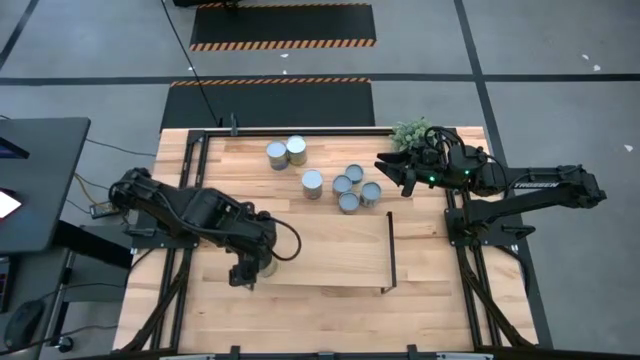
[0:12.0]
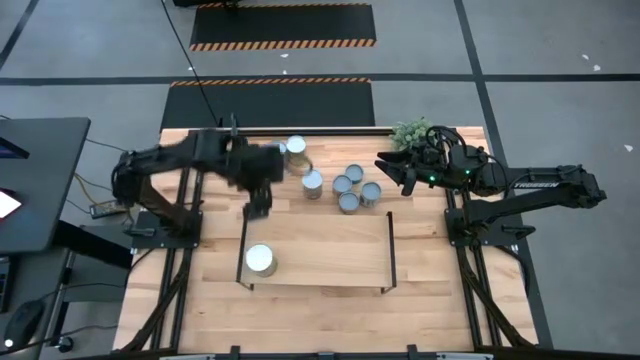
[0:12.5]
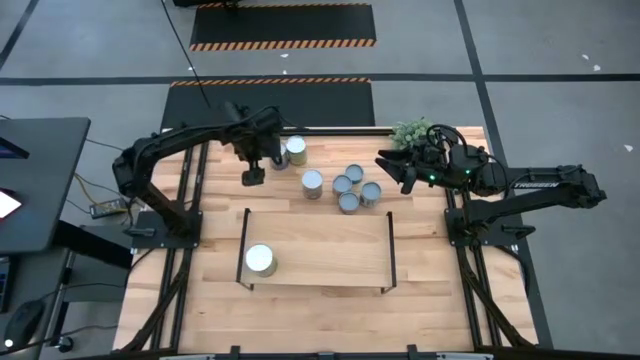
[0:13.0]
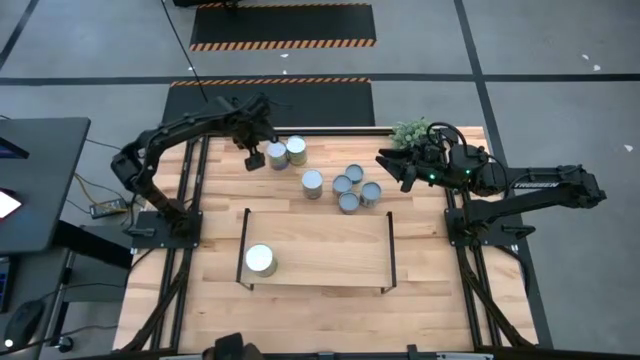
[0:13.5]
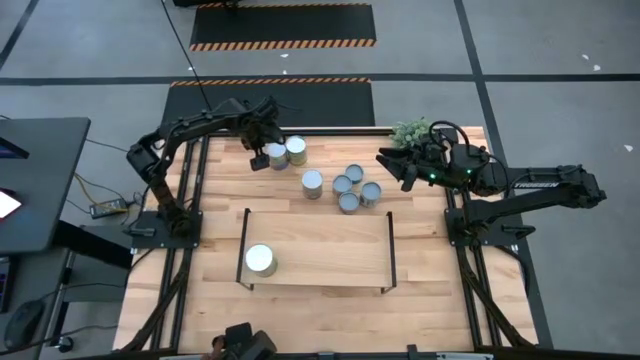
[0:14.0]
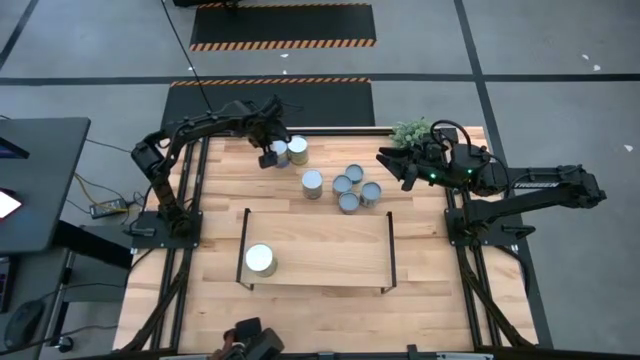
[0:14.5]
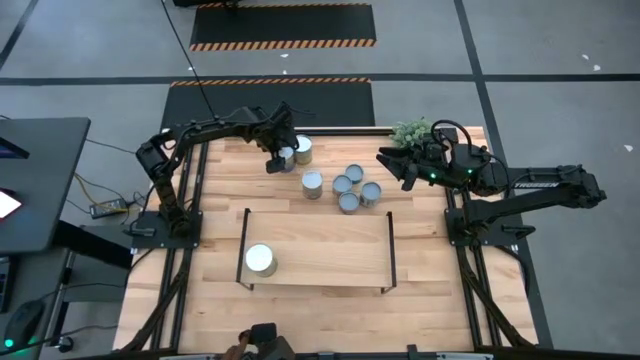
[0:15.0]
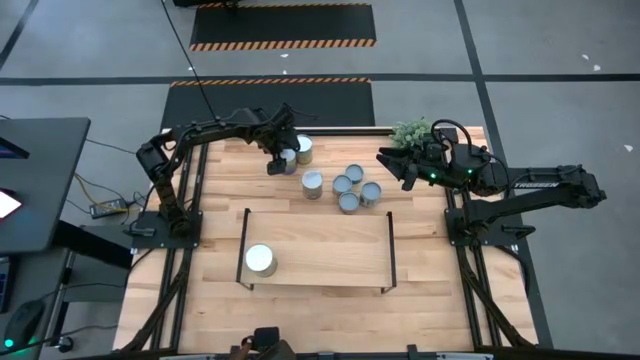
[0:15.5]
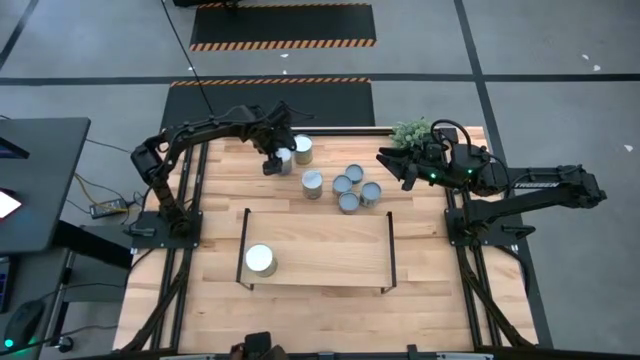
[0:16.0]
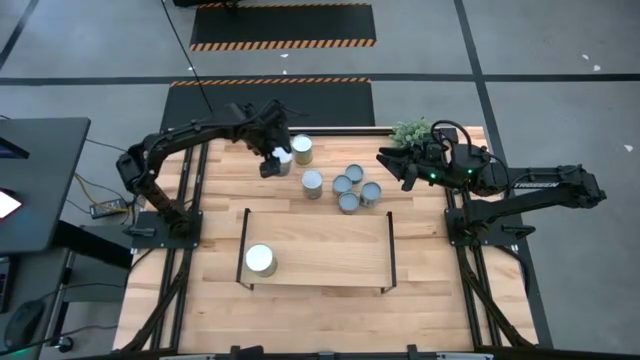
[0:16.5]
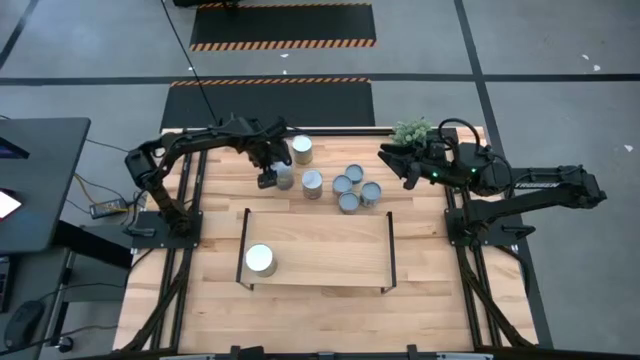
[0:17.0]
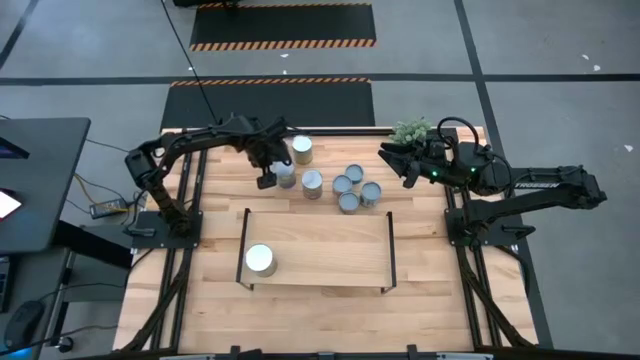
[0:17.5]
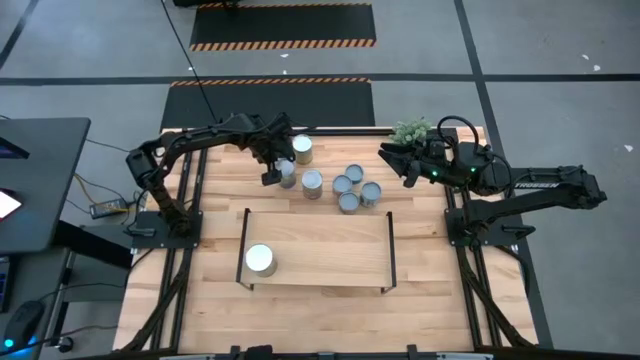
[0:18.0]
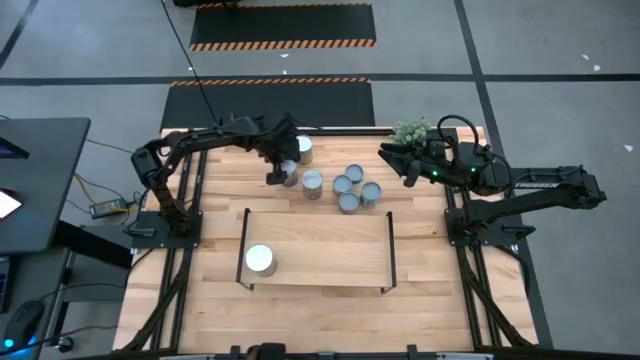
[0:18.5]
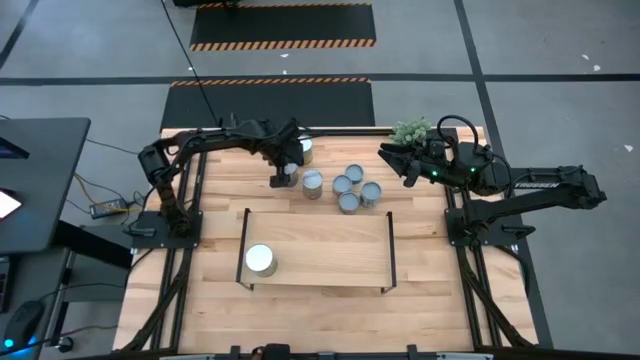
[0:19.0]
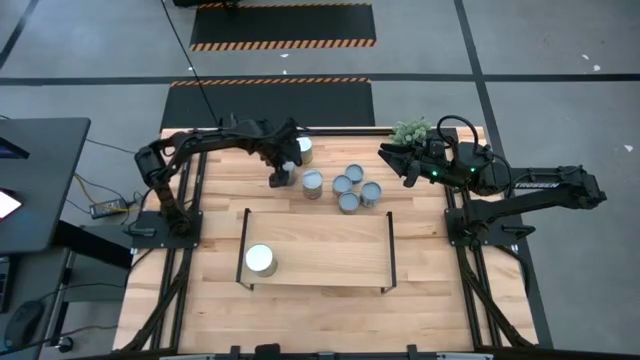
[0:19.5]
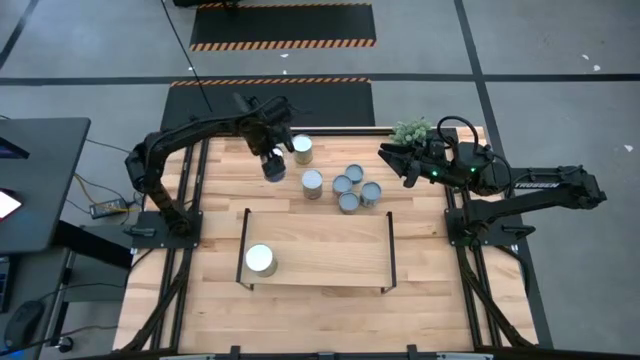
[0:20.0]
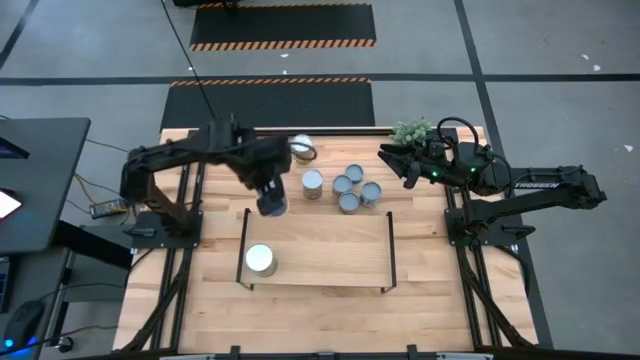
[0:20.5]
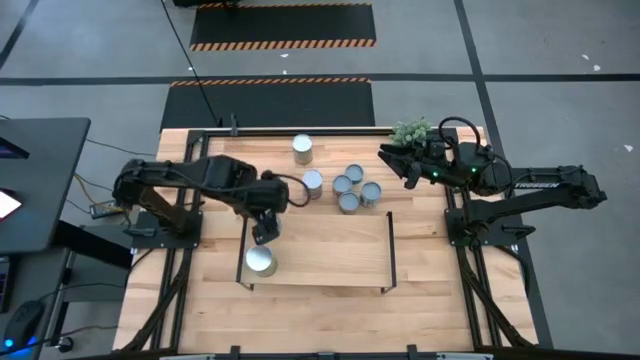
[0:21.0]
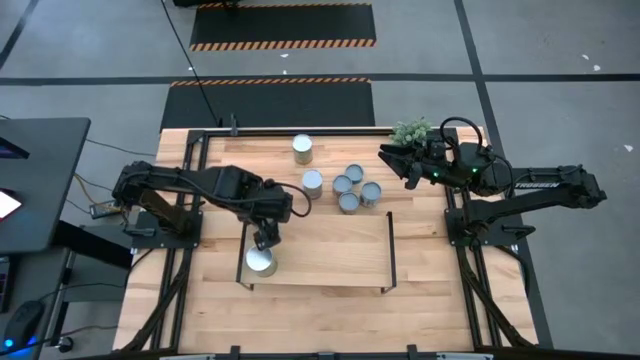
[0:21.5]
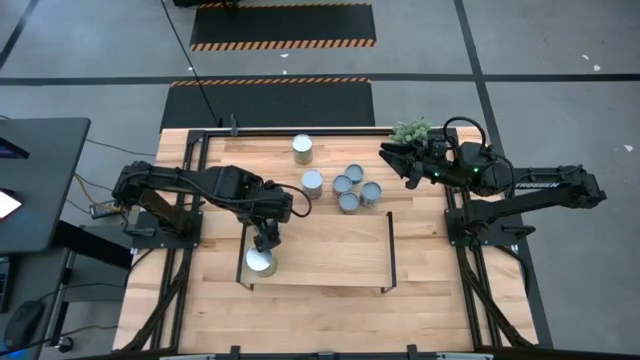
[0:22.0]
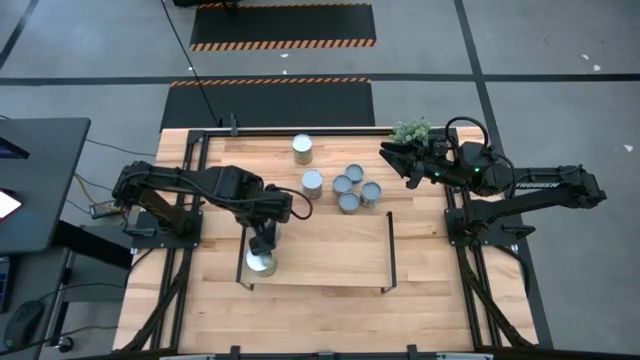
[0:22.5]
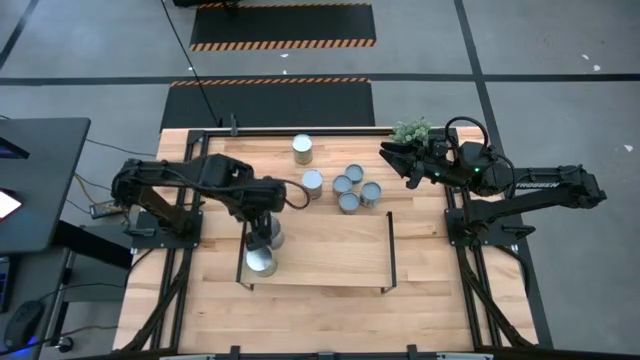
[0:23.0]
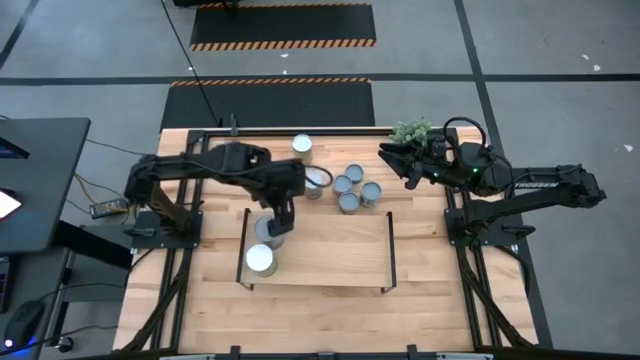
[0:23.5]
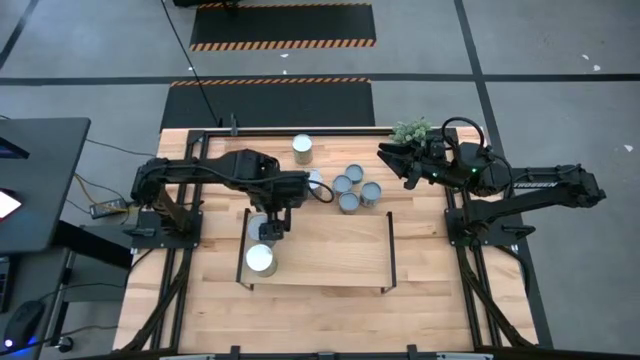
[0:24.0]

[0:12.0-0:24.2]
Task: Pick and place cans onto a shelf
Put the canned peas on the shelf
